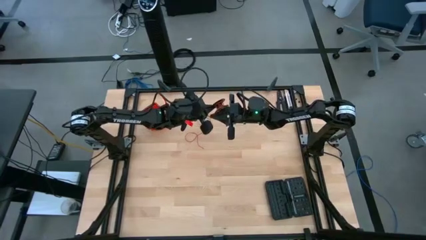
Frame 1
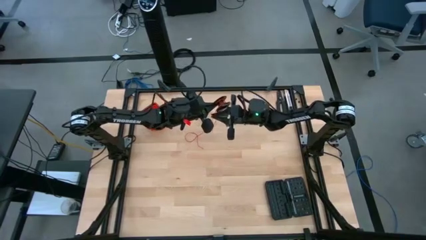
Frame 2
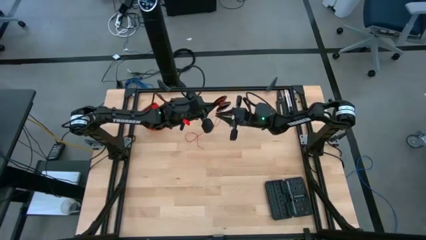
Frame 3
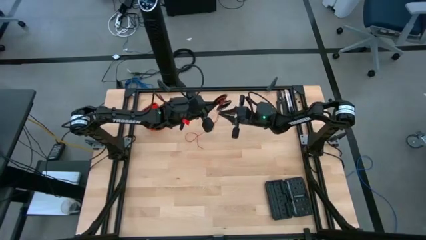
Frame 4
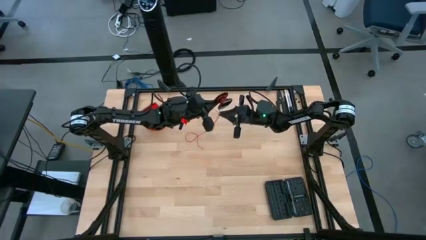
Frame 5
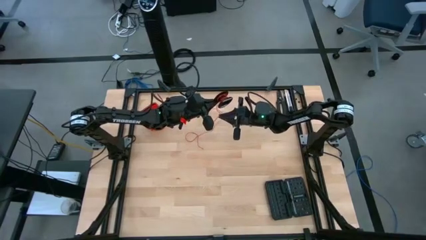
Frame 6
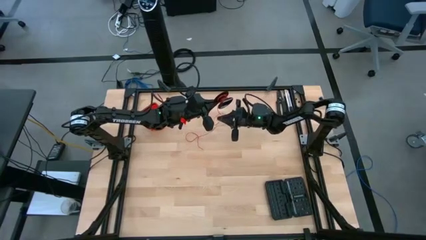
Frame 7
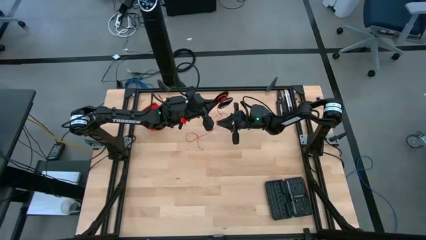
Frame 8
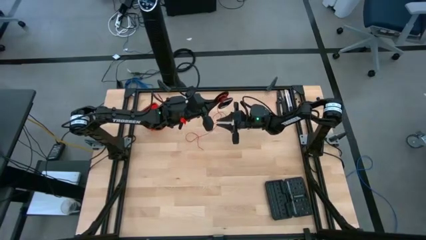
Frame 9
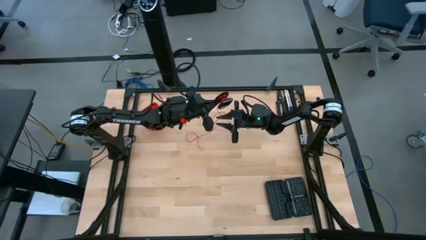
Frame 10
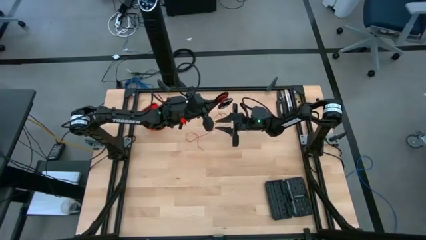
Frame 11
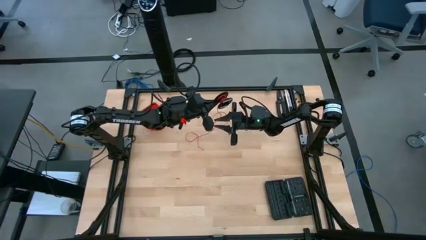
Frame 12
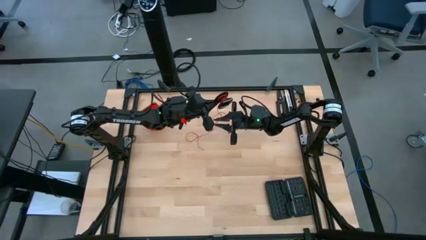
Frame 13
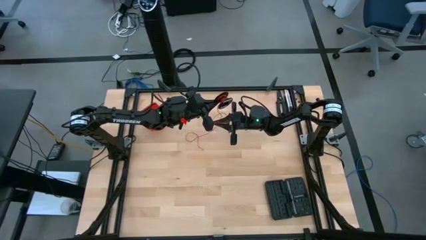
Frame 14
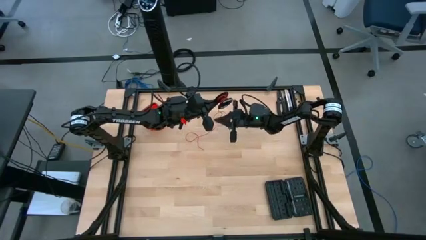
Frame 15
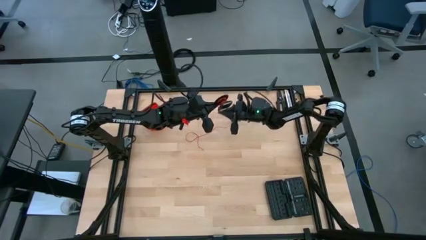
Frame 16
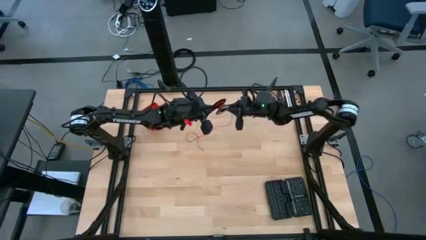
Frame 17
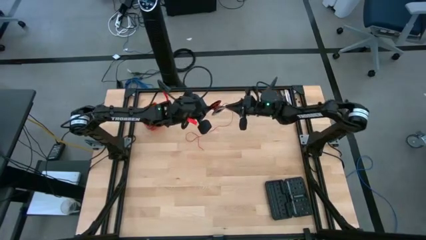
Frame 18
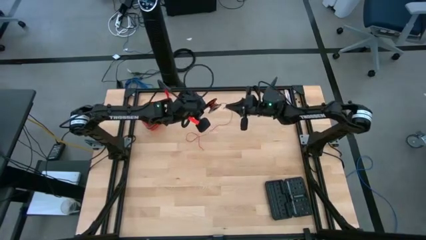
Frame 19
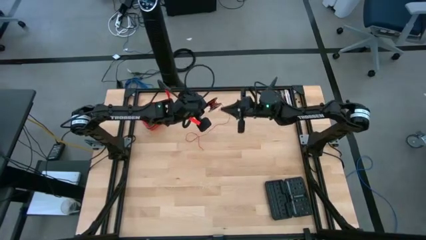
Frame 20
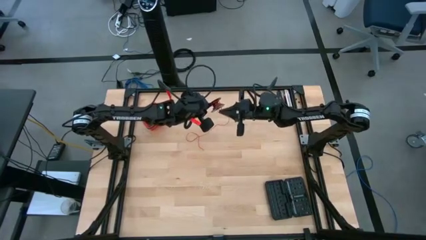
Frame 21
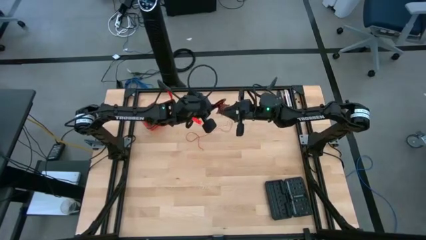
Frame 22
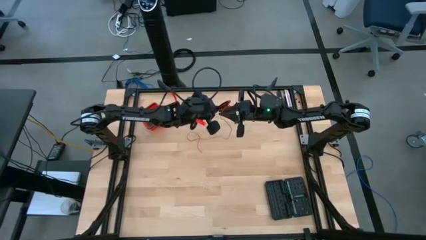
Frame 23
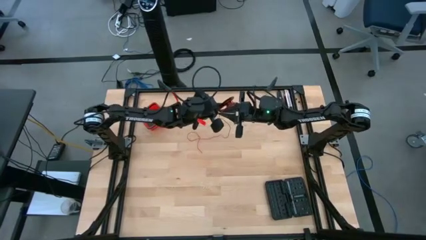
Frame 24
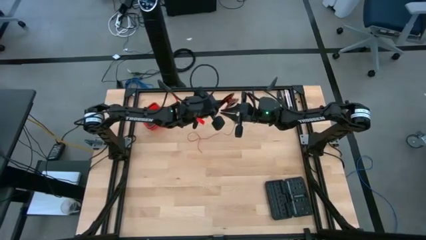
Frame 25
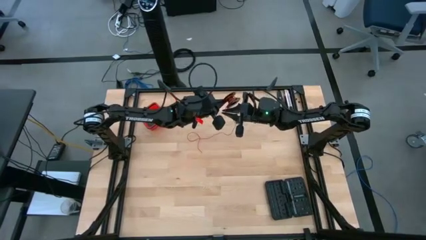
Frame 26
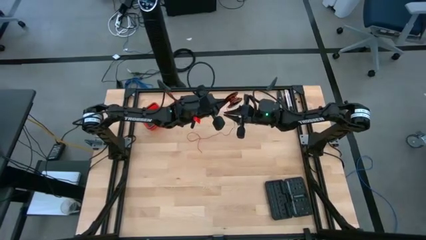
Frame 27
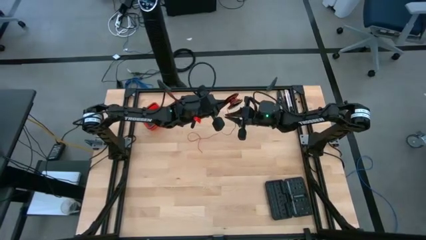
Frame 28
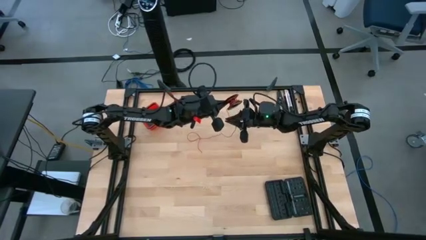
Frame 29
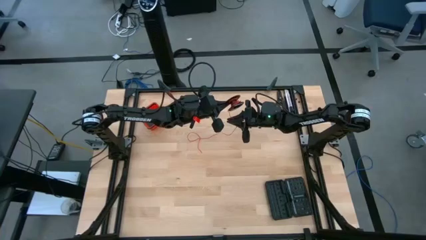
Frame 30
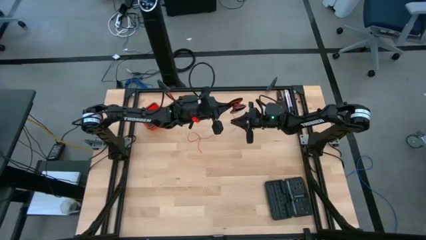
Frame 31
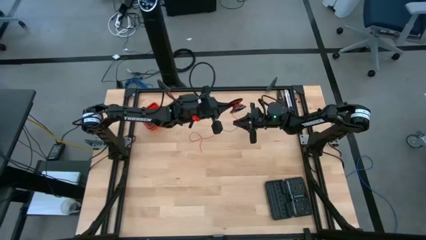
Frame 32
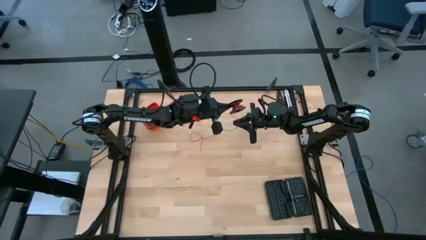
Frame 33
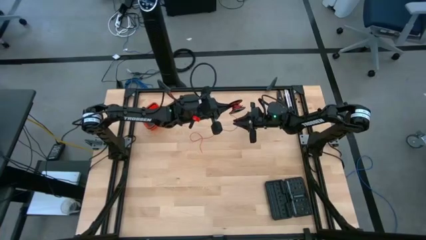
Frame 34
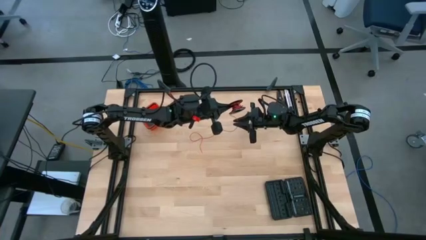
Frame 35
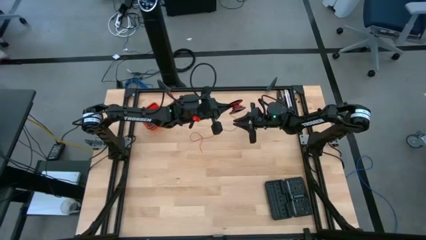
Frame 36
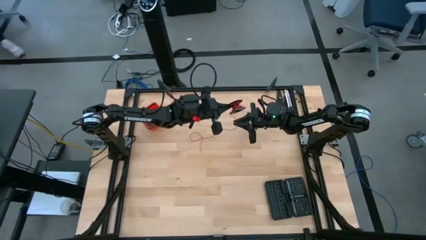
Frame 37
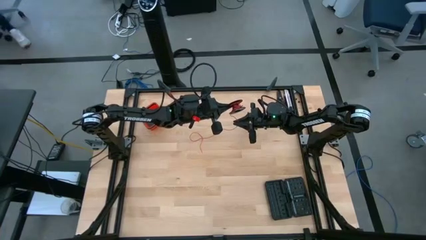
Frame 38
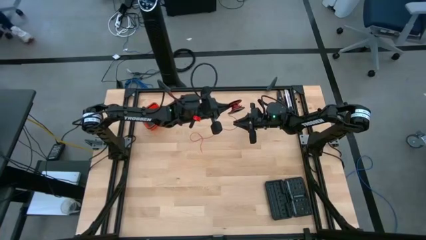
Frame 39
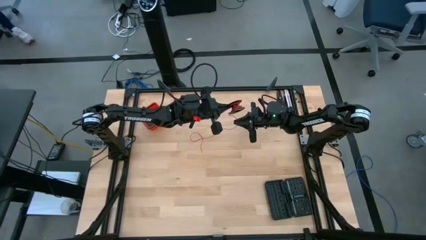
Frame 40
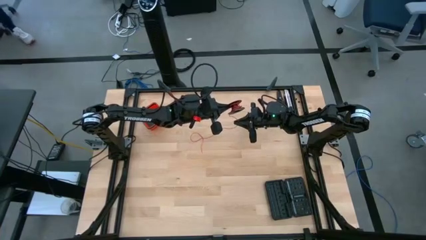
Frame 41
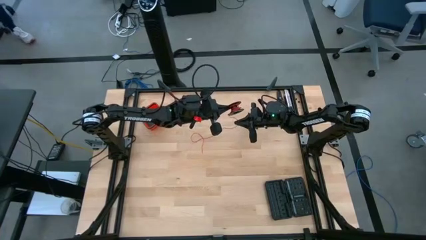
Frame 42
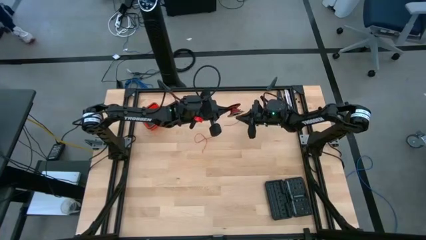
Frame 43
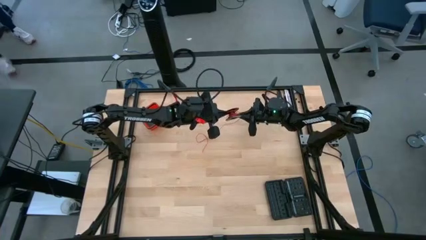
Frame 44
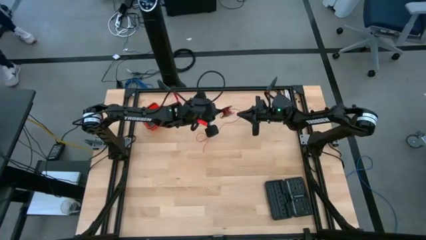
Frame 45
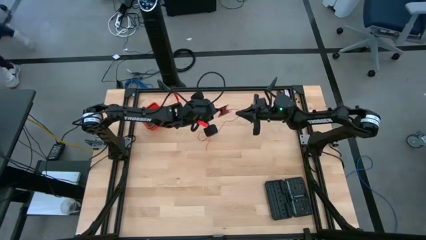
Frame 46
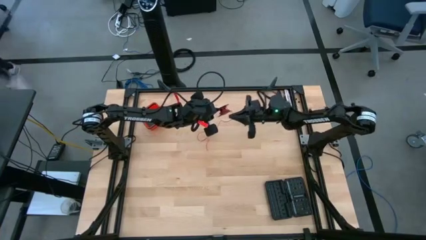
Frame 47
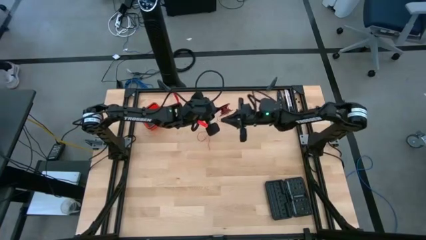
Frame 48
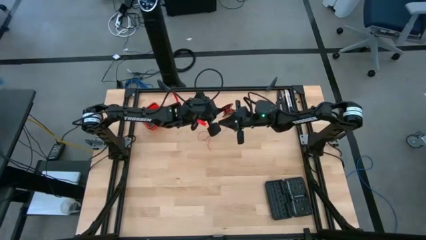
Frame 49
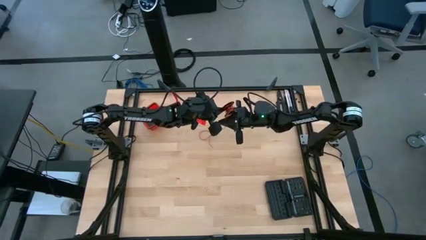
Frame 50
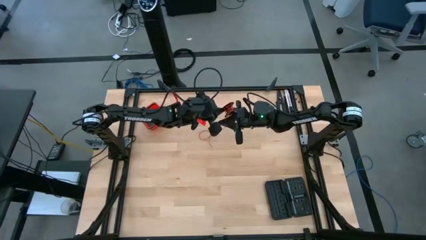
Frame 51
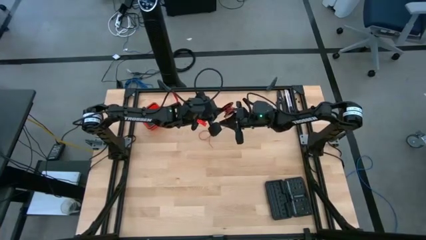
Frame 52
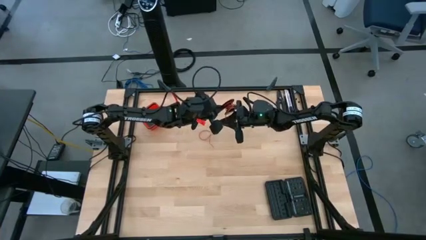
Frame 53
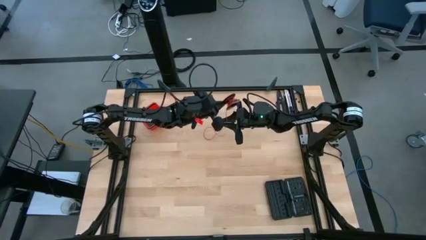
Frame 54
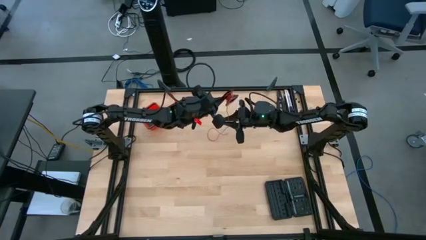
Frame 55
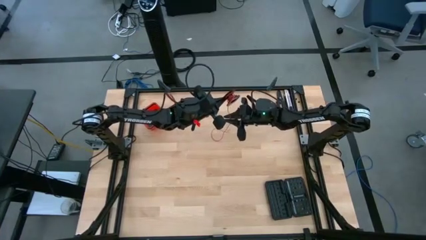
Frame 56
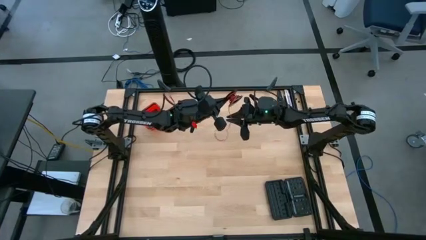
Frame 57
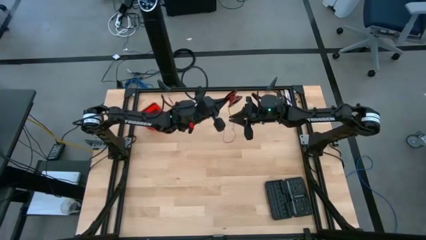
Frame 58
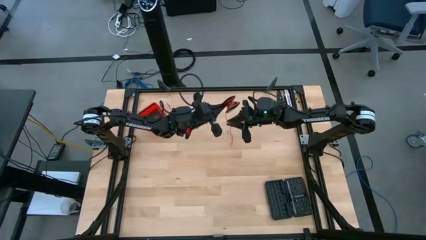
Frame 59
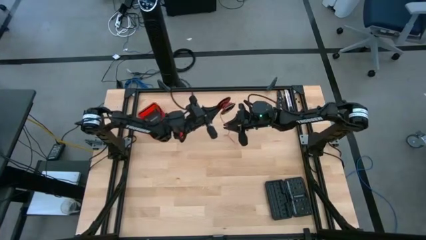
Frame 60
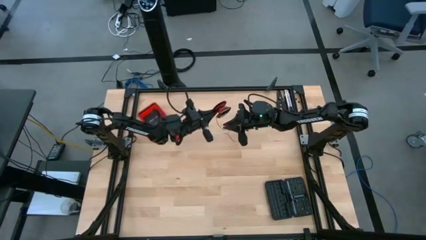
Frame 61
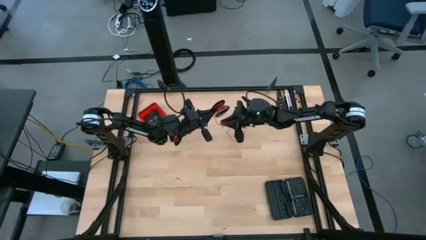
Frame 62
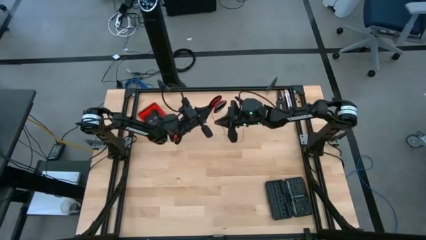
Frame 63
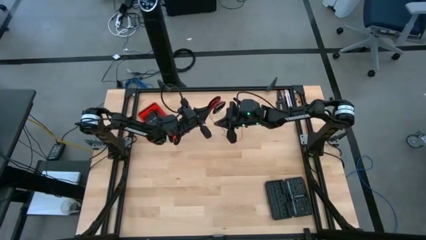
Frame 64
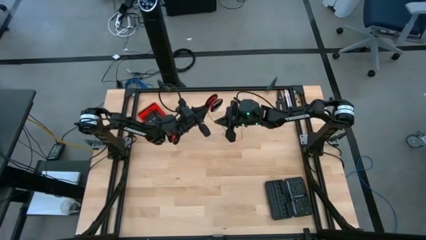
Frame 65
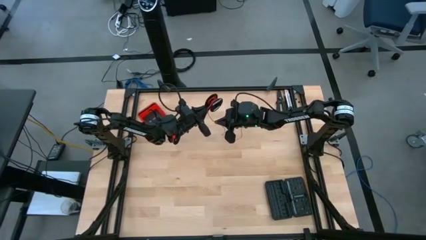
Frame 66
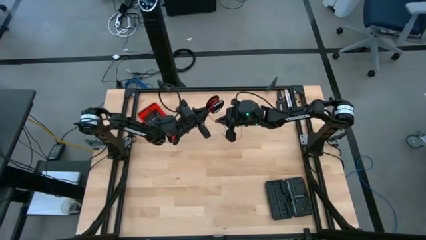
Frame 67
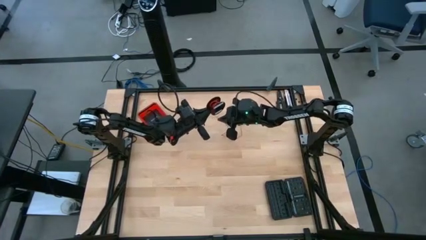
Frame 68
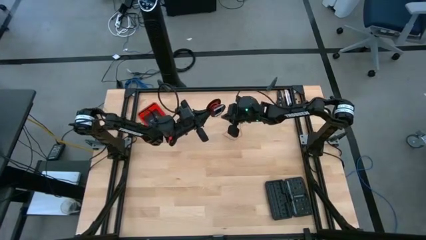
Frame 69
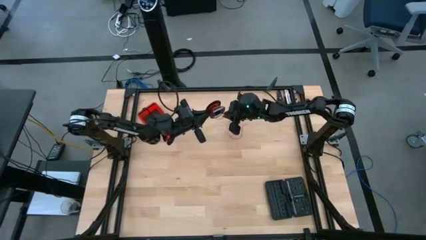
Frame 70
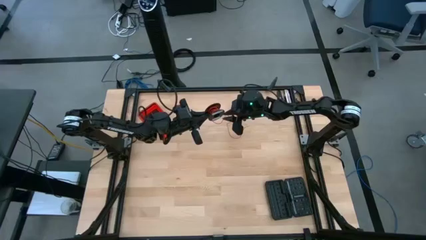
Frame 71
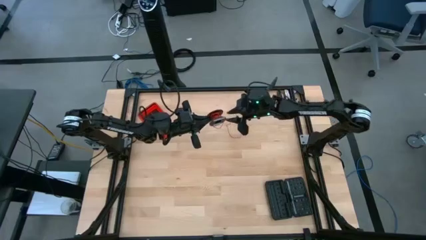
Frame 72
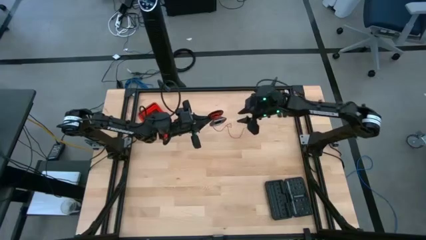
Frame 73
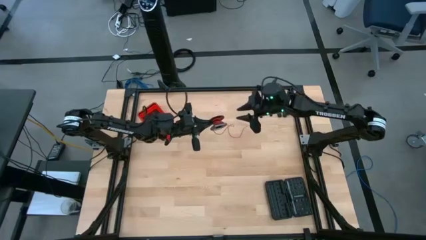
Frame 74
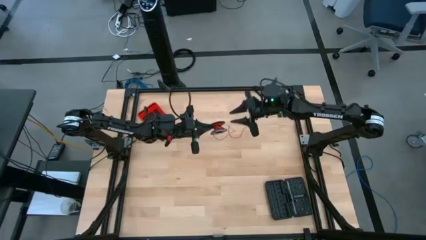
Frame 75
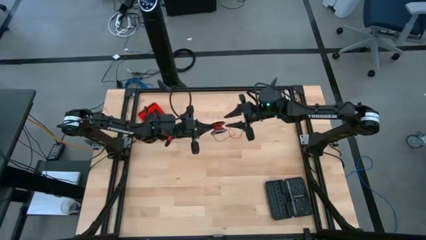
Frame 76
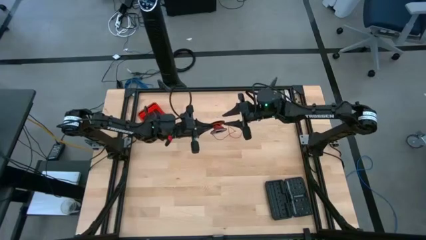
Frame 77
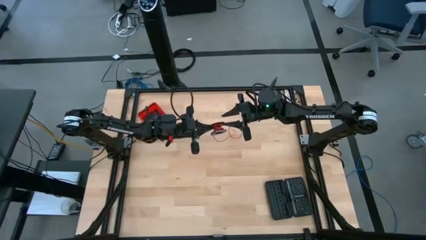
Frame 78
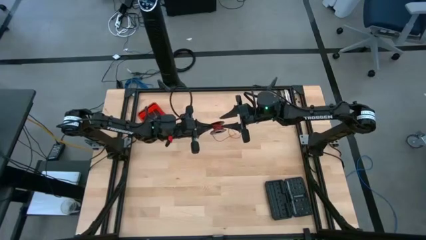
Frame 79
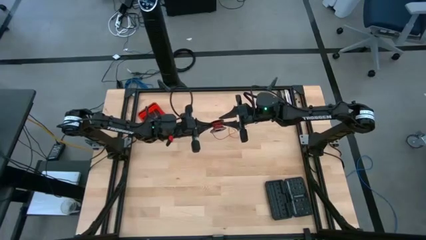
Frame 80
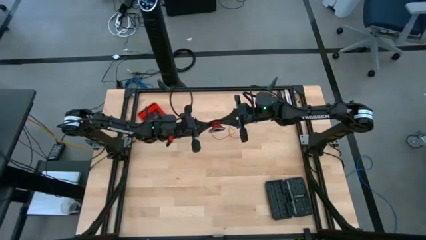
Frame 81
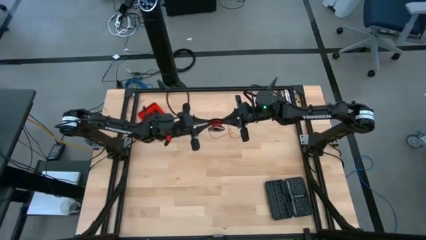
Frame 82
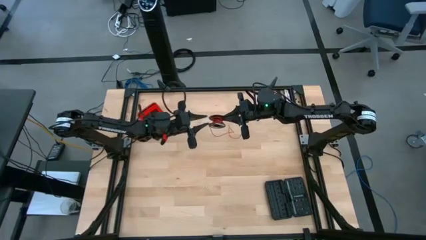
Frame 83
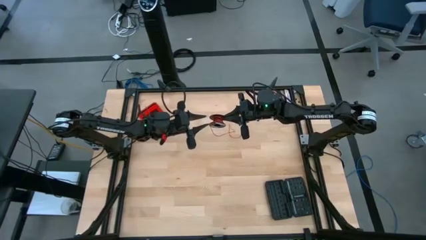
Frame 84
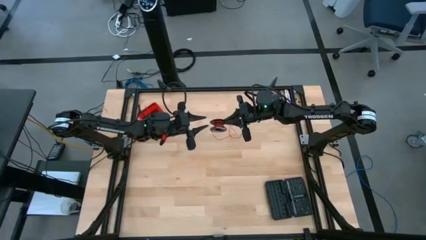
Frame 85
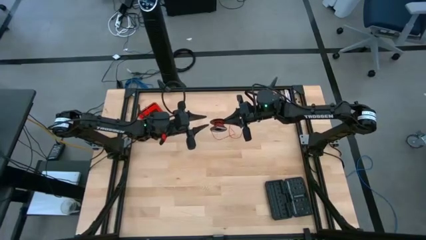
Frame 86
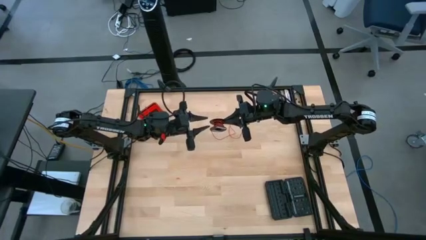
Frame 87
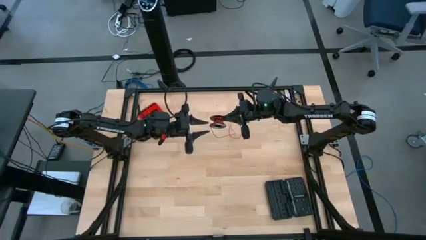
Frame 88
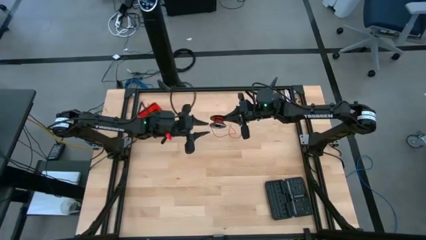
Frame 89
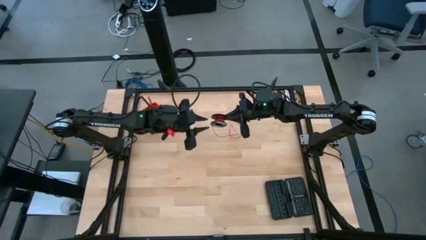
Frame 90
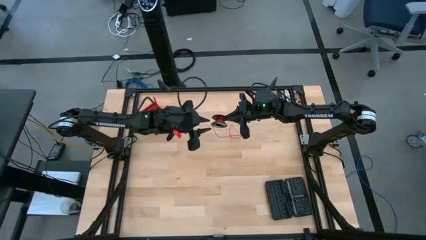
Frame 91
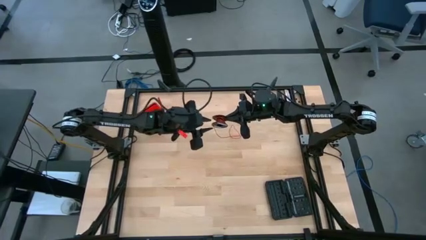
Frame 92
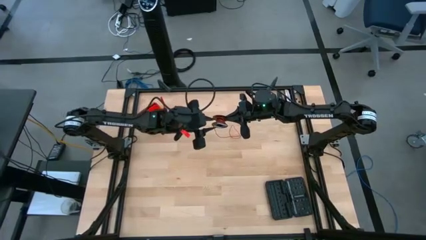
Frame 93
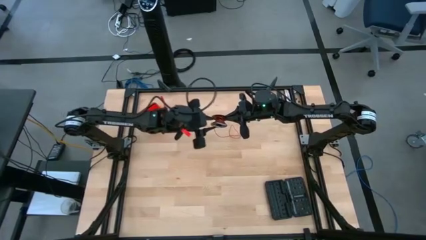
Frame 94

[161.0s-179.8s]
Task: Coil cords
Coil the wire to the spool
